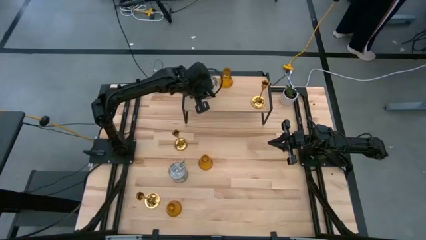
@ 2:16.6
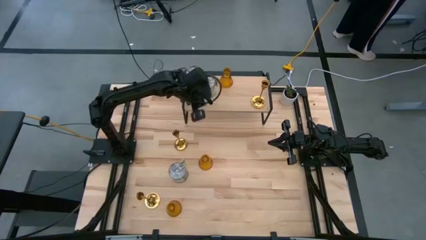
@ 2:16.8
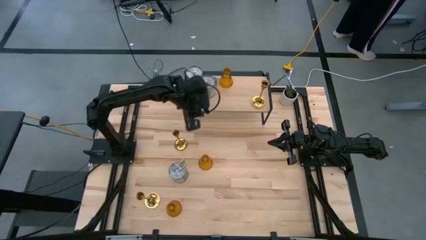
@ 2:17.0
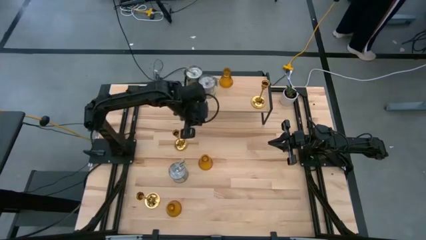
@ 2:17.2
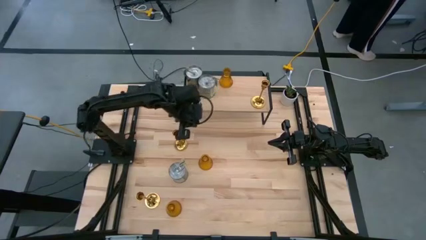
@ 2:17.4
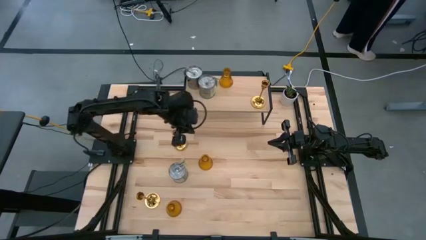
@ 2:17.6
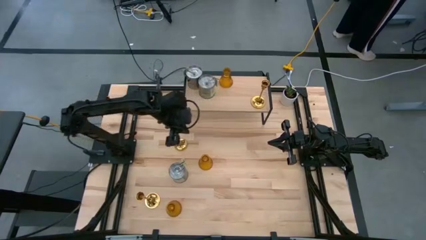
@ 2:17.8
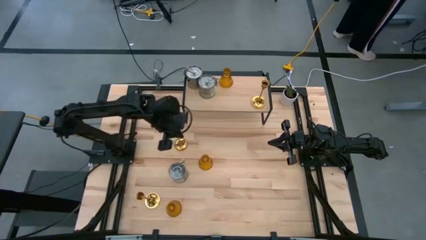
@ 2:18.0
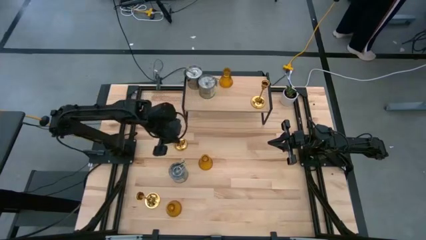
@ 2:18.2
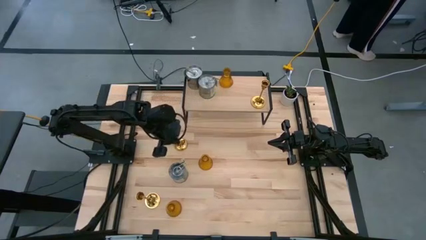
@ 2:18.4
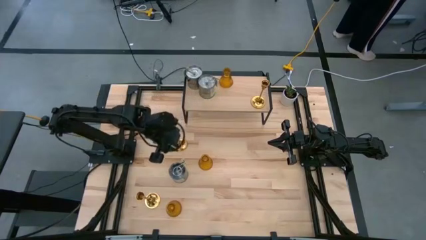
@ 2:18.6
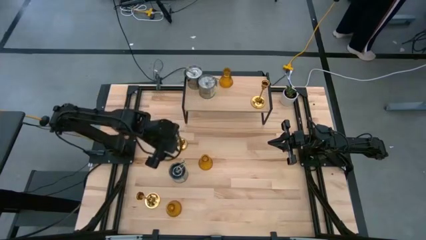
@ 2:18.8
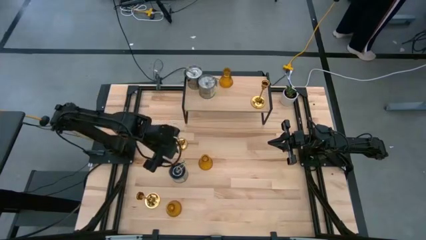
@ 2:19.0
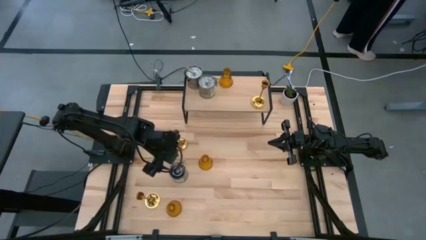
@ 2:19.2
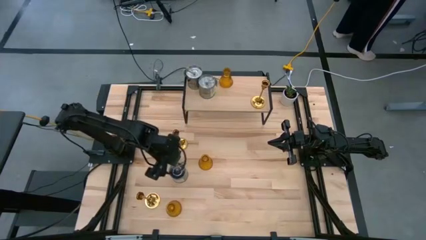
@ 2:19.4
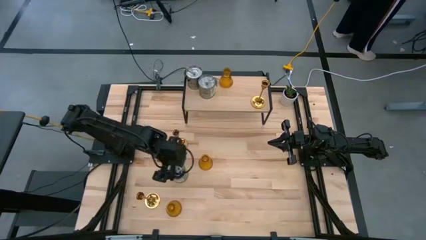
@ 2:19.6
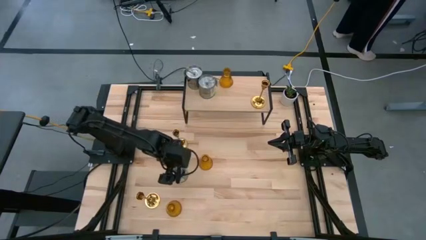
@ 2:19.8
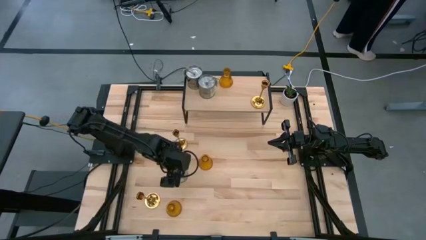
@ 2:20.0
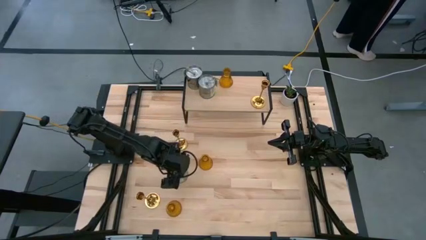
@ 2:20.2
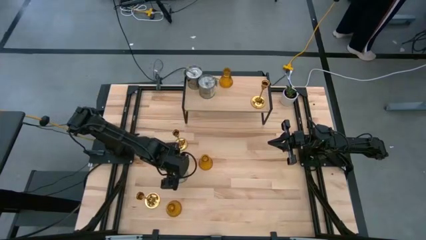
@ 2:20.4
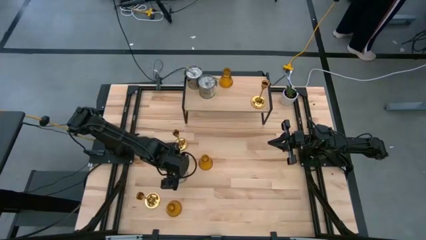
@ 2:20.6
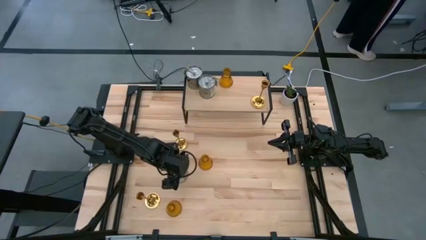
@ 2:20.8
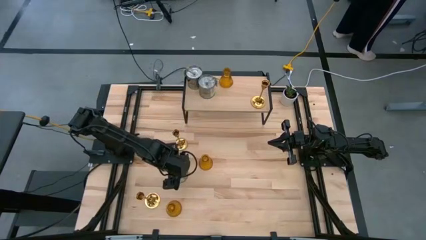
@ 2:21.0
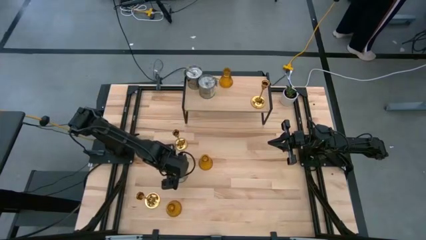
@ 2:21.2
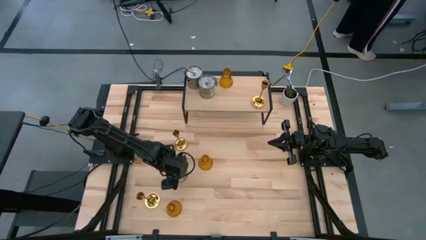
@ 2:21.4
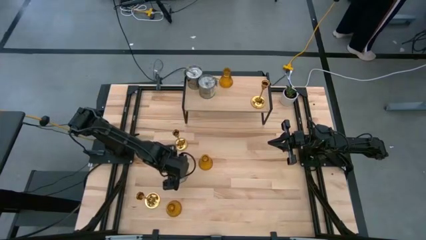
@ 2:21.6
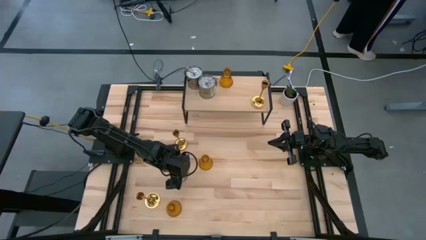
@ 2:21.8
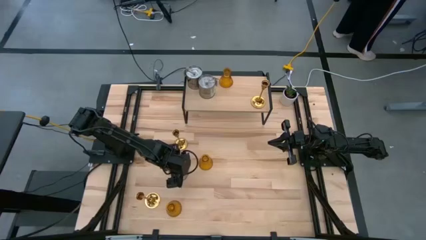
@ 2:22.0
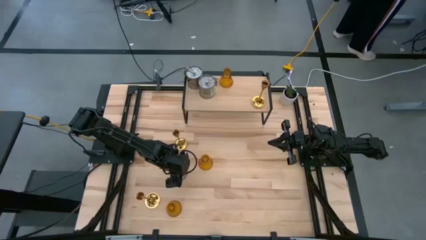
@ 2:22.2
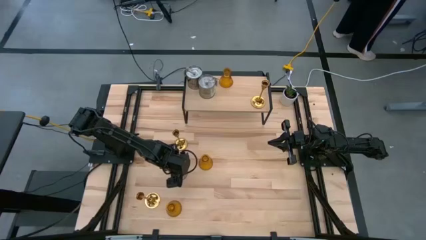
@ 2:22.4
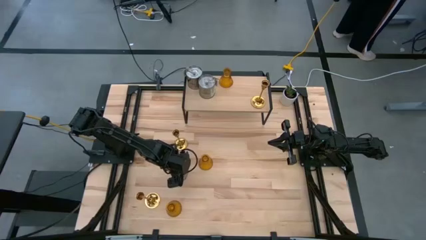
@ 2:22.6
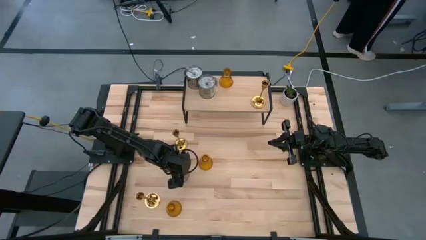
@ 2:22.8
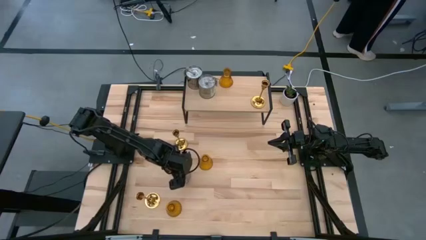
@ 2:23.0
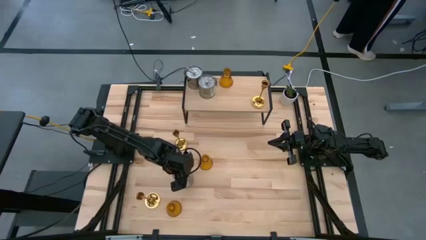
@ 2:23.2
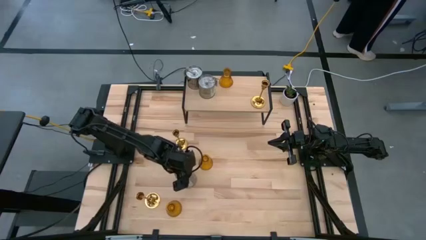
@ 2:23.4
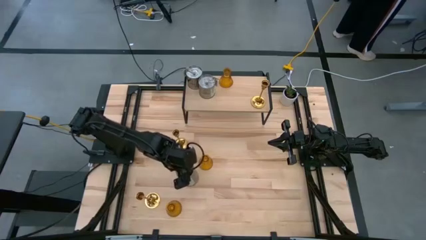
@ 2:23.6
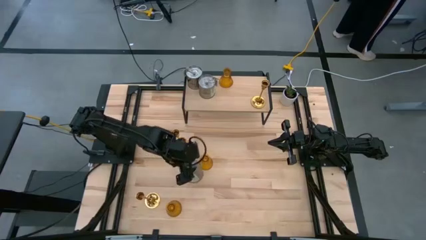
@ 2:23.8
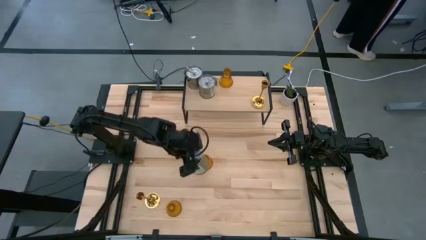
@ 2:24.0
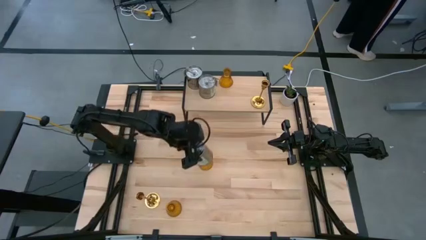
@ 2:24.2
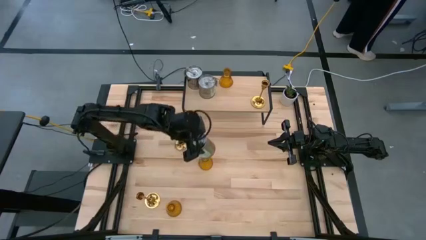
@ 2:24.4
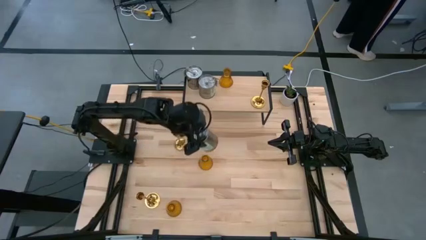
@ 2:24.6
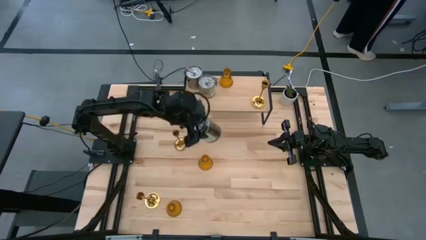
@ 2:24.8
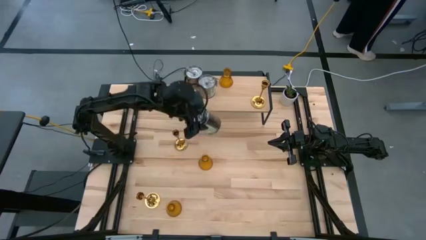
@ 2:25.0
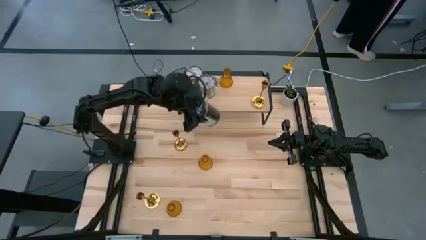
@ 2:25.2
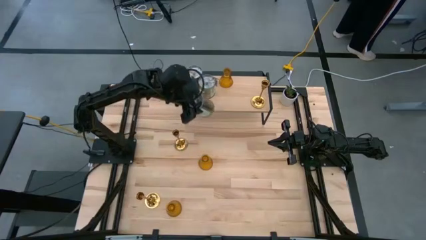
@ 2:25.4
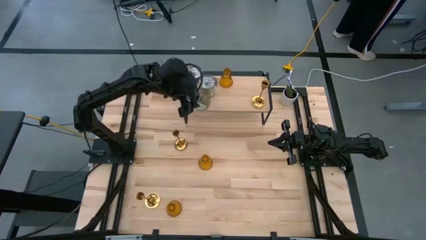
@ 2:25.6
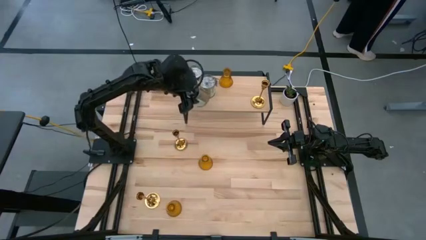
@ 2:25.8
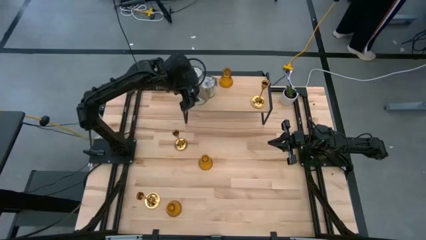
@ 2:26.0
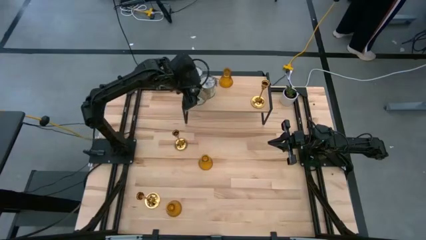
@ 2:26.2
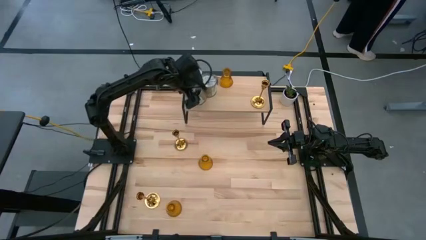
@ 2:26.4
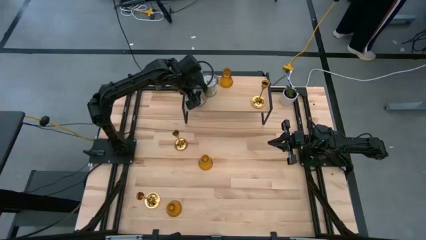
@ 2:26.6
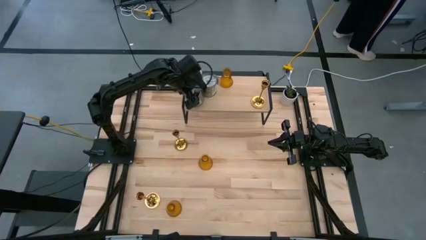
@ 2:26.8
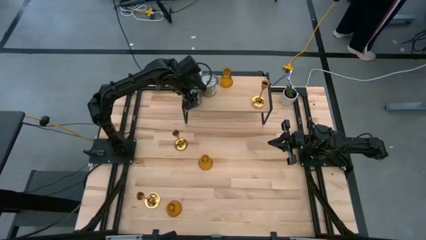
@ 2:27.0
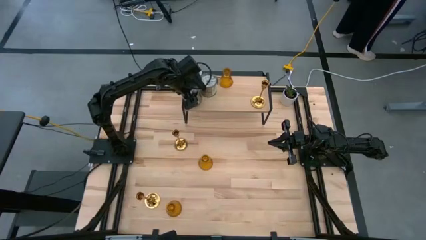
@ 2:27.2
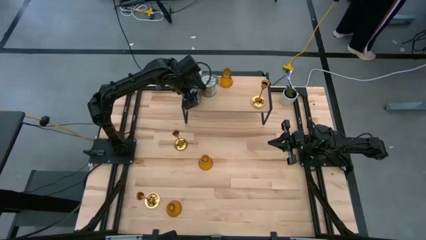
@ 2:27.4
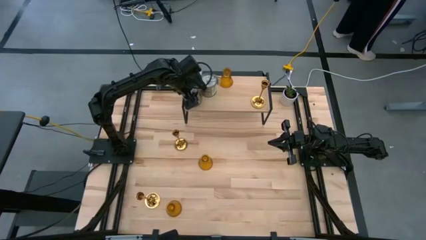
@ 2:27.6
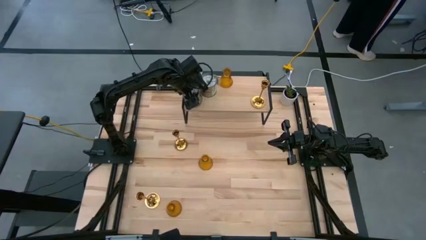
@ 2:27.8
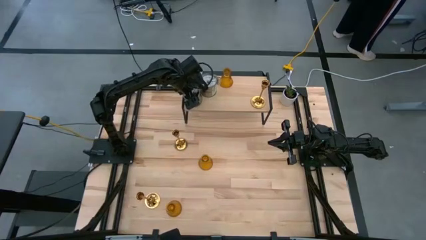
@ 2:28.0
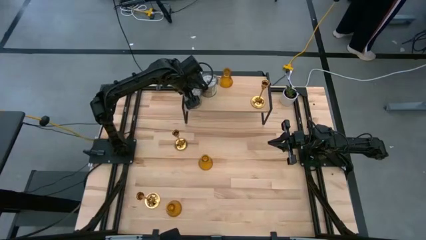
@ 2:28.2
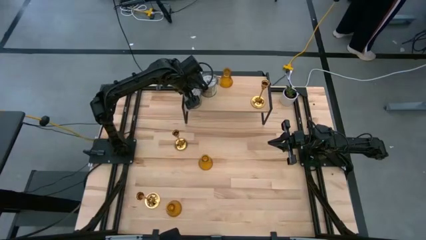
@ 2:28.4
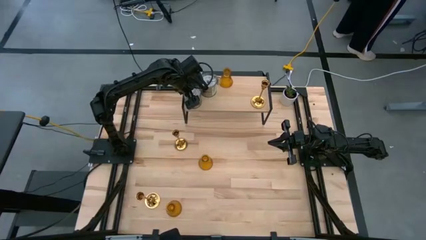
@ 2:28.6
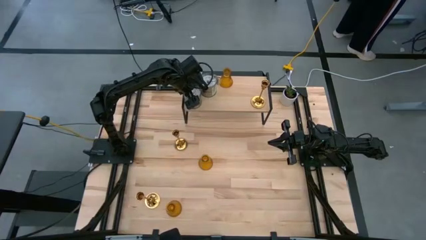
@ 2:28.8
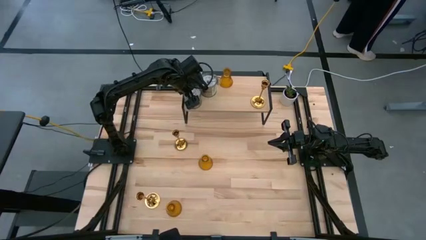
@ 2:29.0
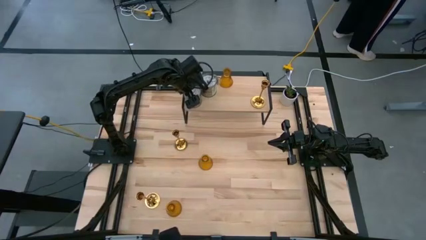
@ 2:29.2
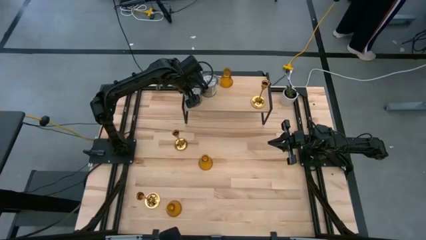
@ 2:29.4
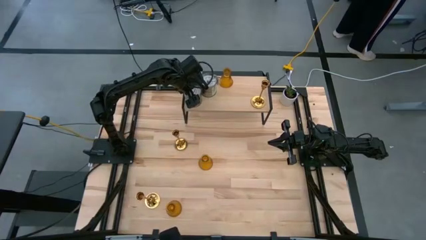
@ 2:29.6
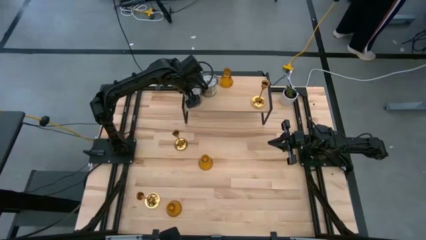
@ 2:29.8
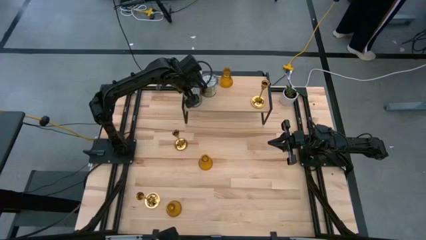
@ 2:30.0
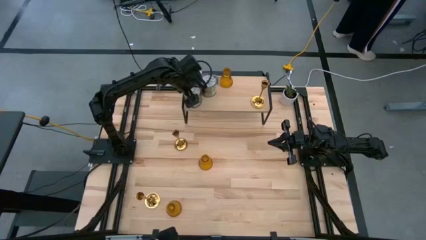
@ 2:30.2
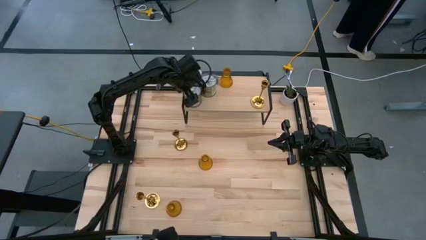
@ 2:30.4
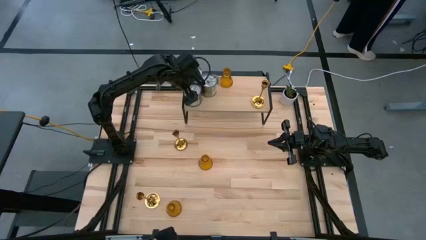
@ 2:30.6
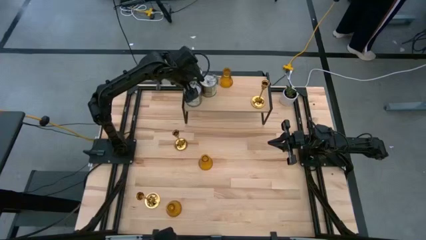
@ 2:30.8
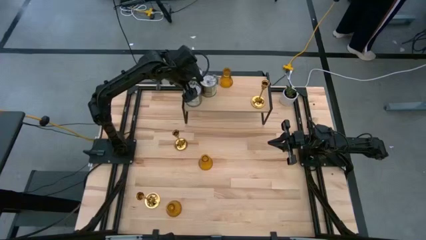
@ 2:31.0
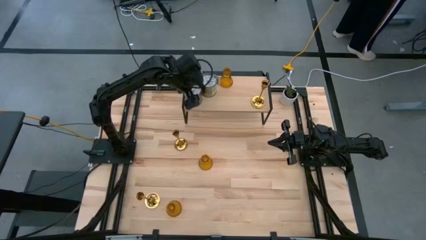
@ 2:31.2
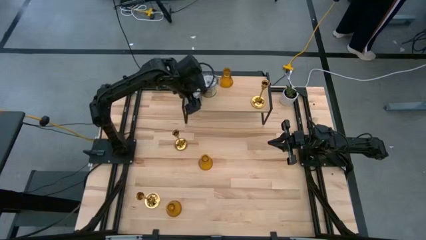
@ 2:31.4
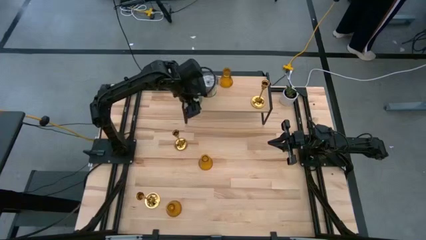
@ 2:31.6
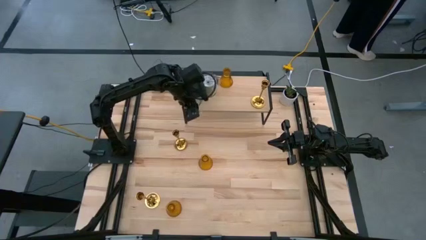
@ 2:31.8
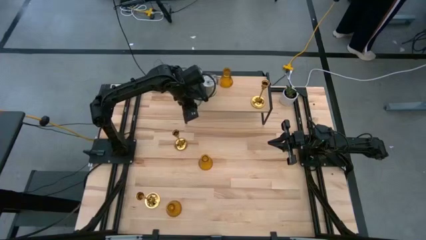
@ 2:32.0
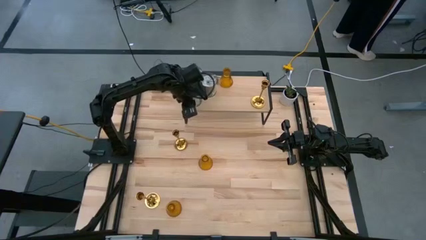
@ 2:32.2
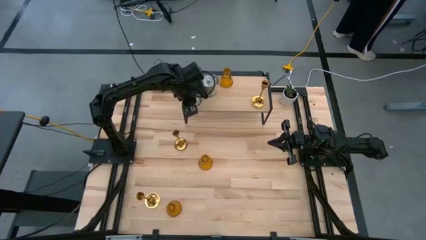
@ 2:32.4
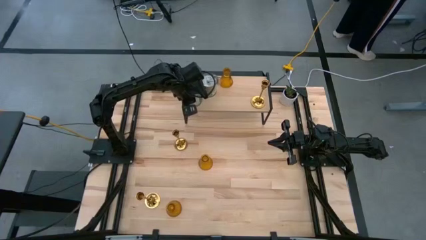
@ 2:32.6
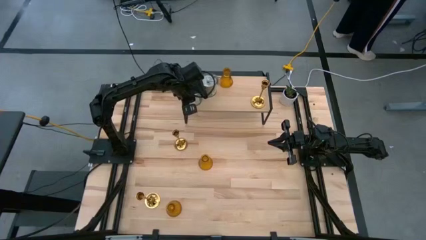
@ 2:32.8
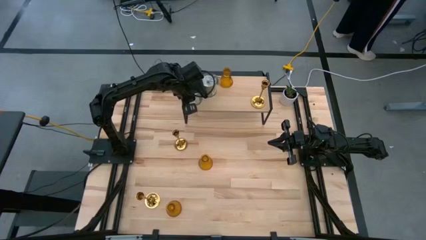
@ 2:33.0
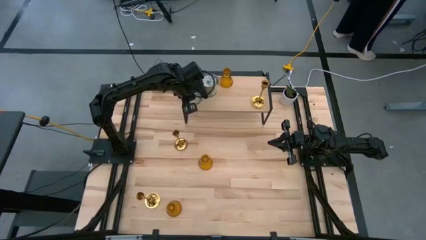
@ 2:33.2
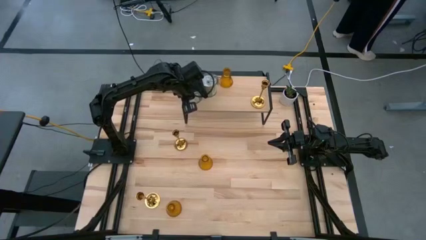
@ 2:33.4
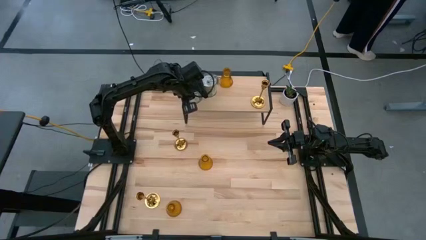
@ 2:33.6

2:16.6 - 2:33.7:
Task: Pick & Place candle stick holders
Put the scented candle on the shelf aligned with the other scented candles
